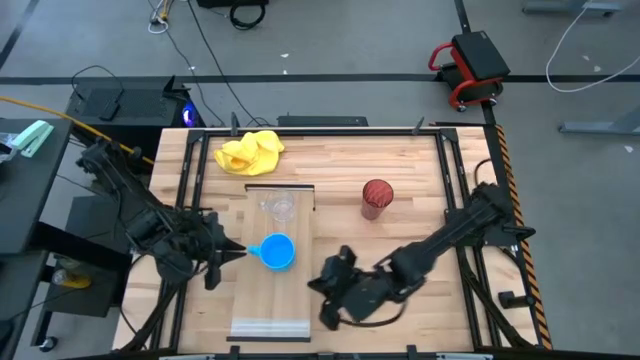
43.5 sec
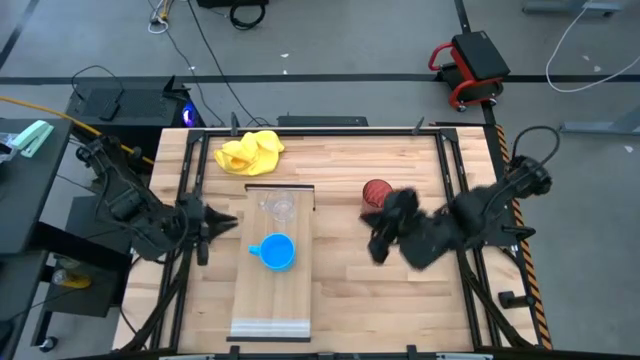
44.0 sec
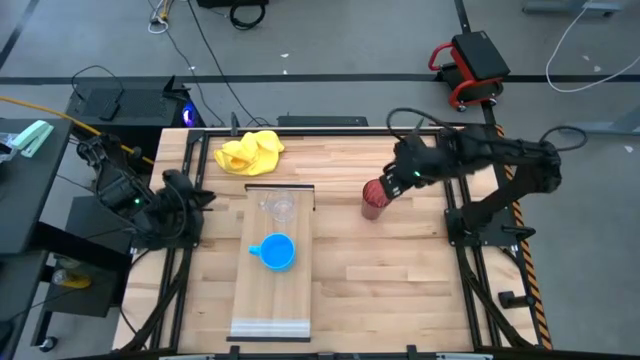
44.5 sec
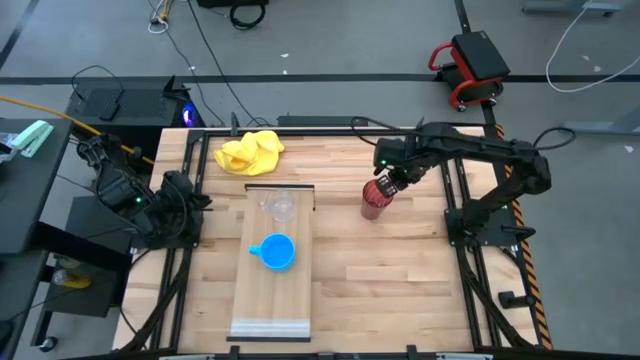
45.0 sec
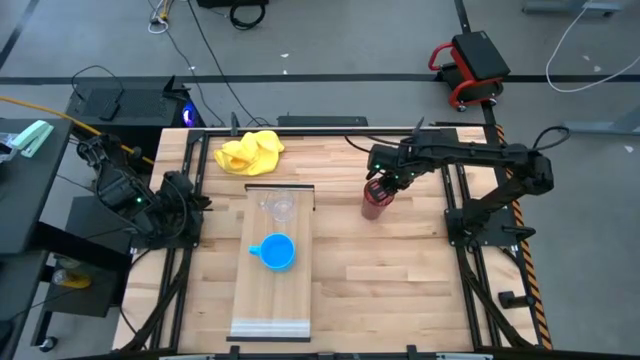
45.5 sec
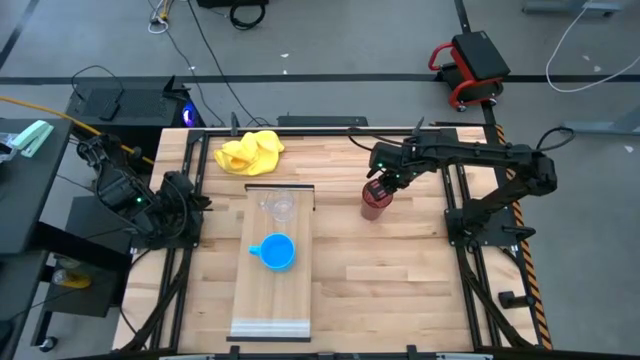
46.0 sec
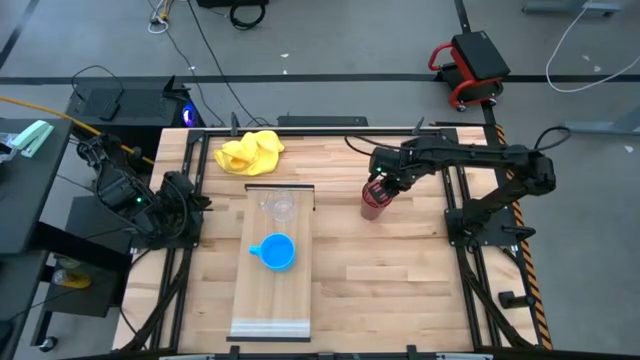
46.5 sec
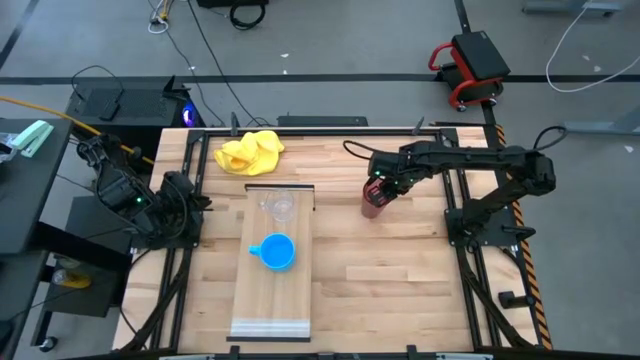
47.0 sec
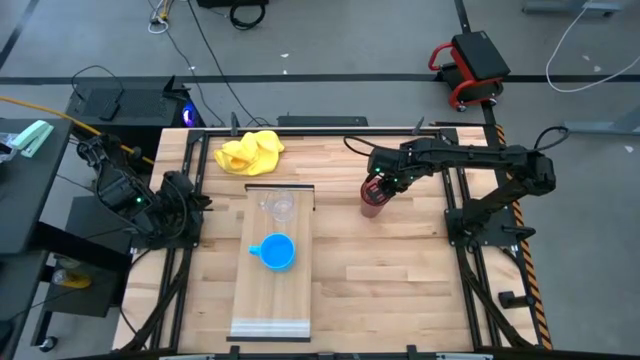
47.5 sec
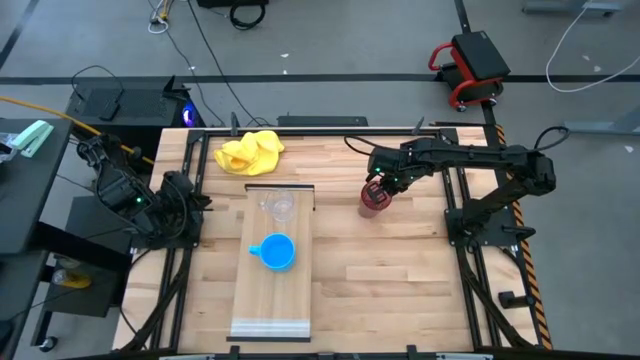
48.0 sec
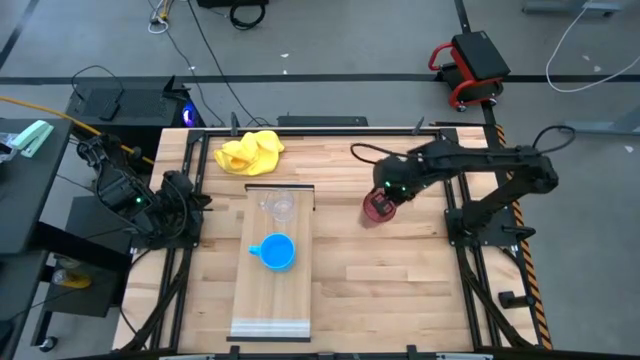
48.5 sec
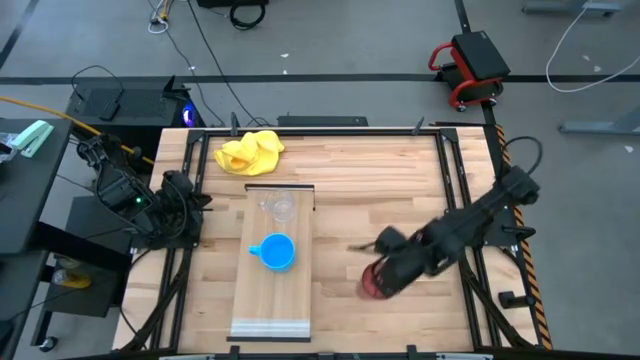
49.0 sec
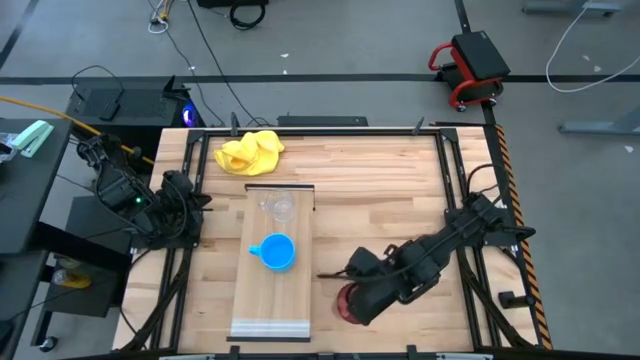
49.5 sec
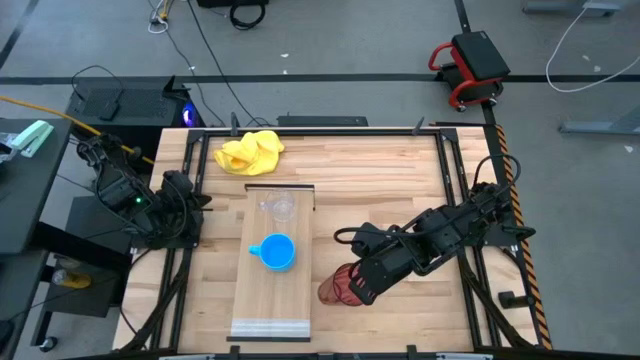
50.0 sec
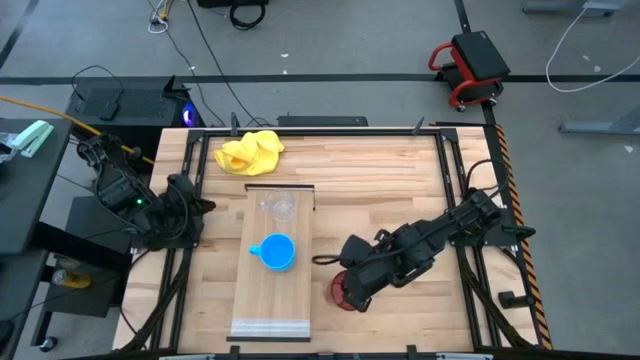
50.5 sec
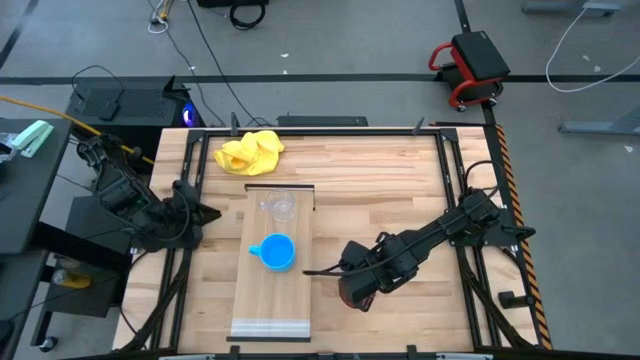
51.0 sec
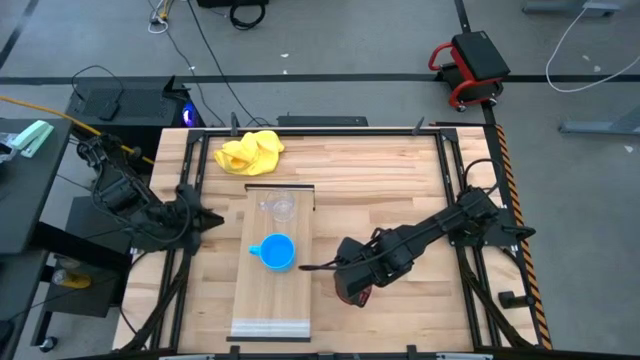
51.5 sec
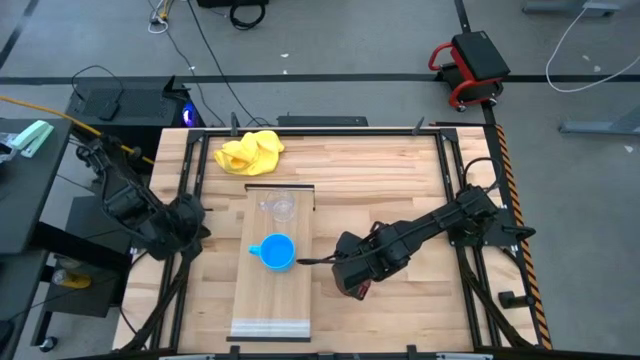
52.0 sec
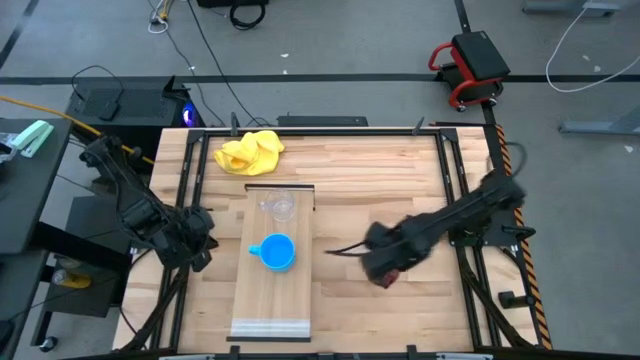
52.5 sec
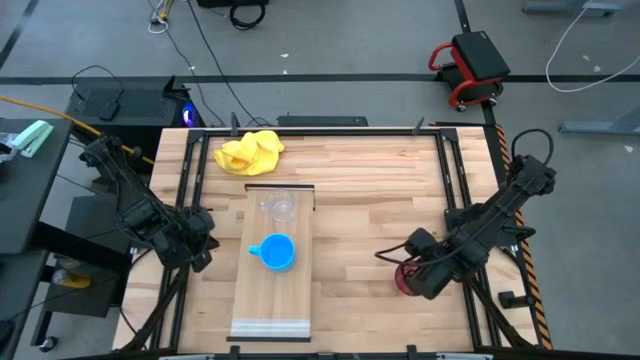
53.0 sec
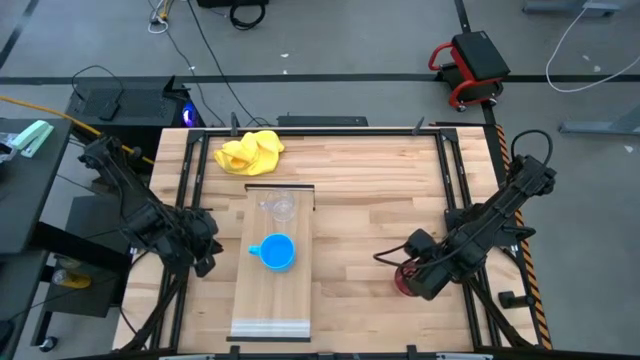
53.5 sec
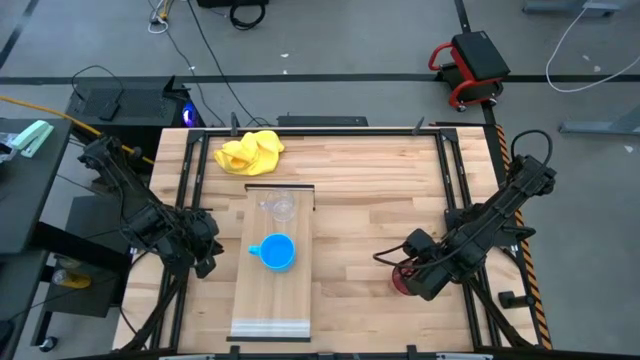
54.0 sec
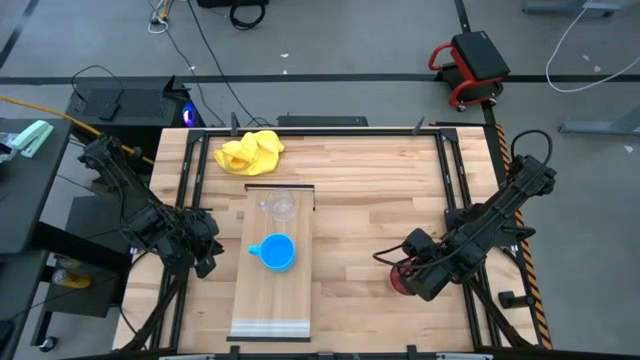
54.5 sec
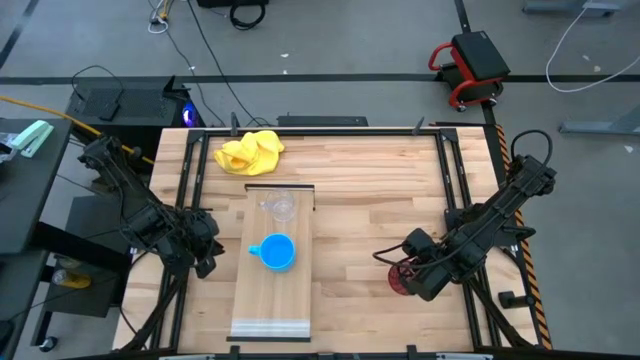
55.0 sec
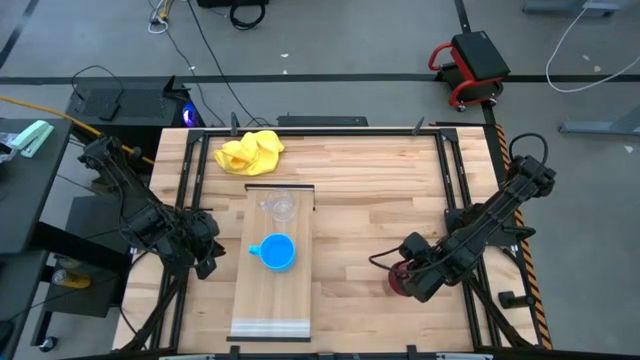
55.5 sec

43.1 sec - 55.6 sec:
Task: Stack small to large cups/mugs on shelf
Move the red cup to the bottom right on the shelf

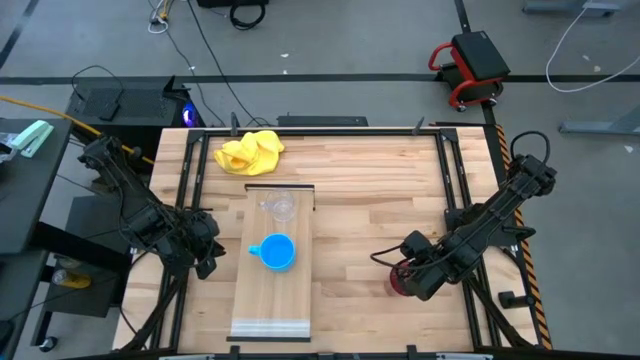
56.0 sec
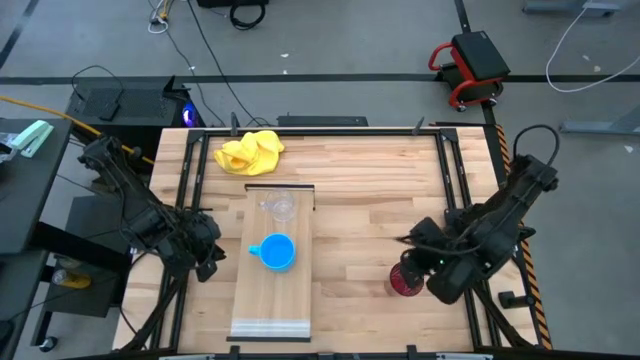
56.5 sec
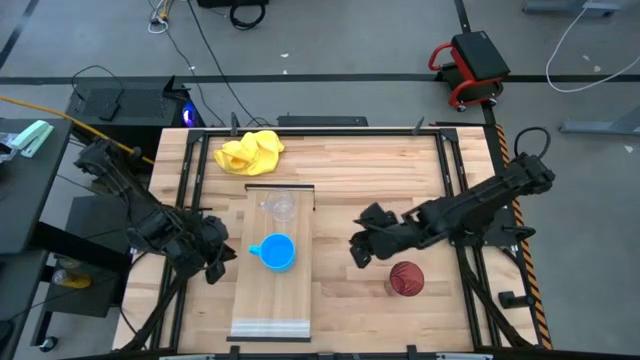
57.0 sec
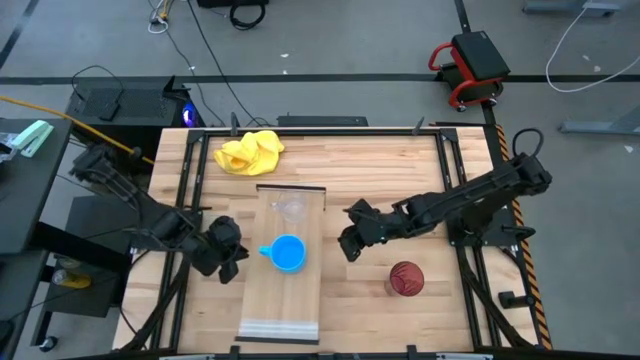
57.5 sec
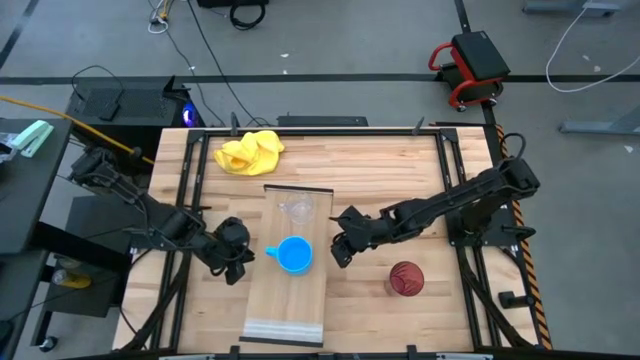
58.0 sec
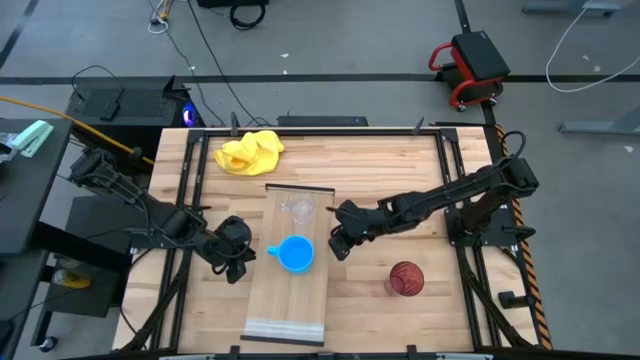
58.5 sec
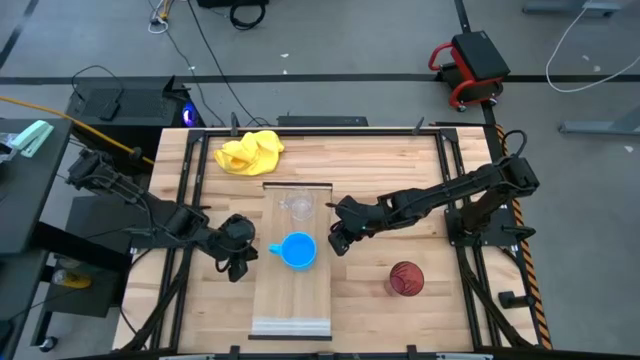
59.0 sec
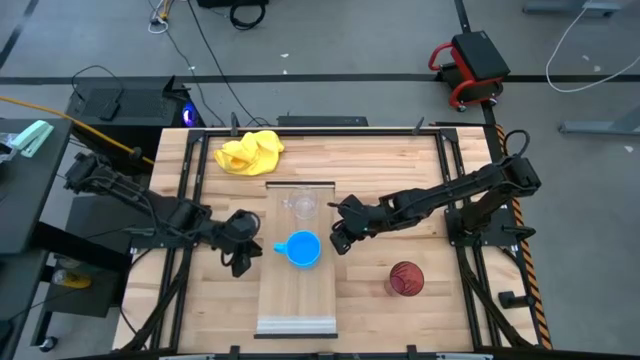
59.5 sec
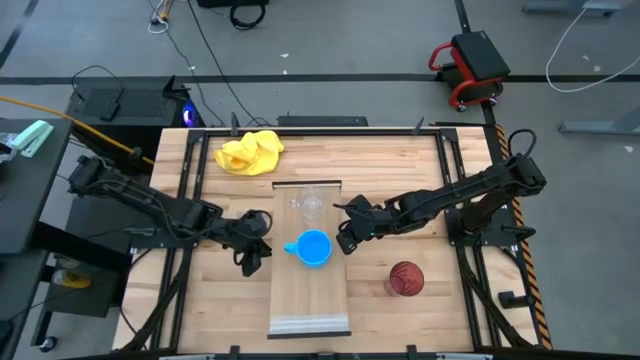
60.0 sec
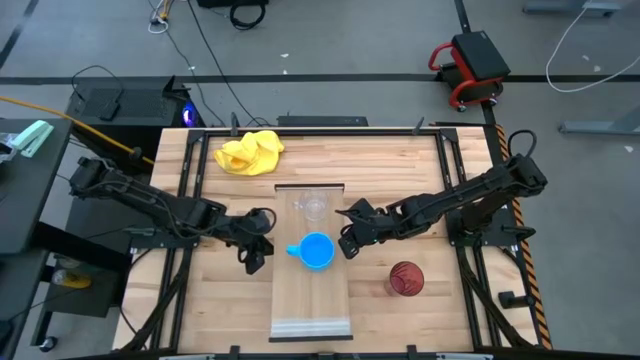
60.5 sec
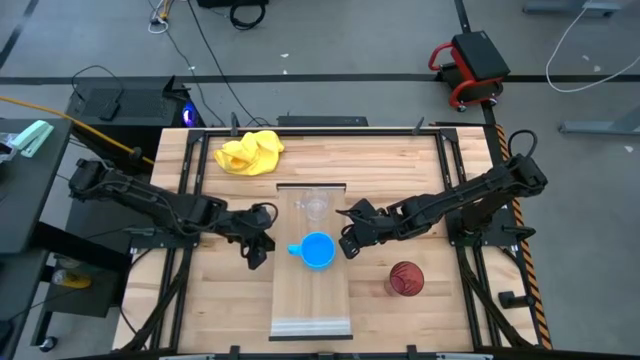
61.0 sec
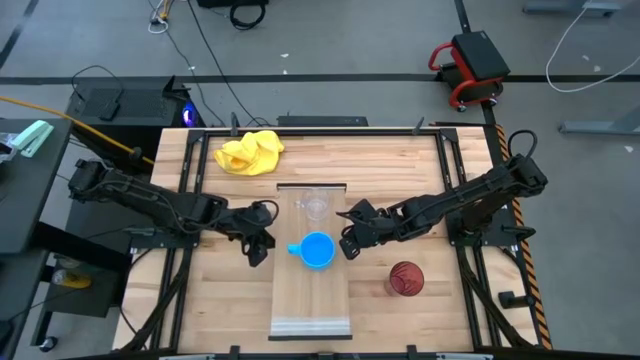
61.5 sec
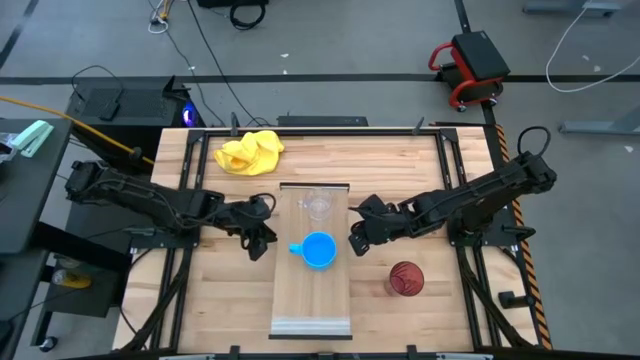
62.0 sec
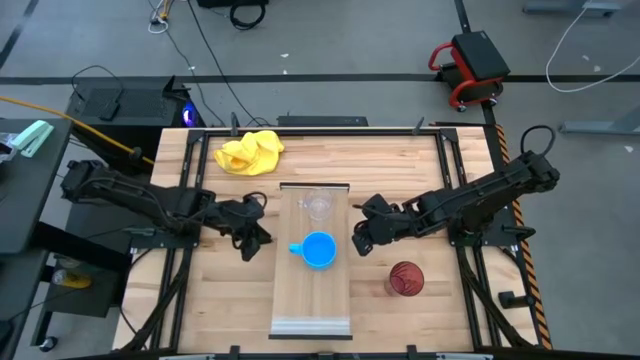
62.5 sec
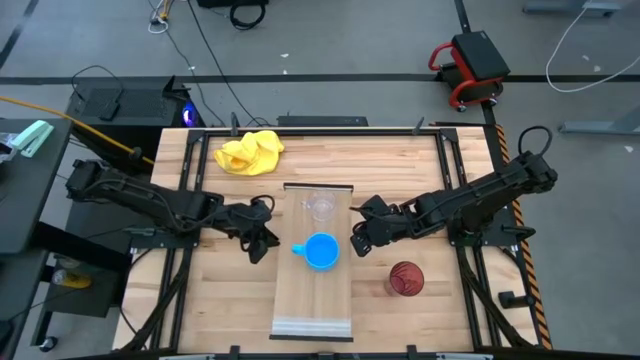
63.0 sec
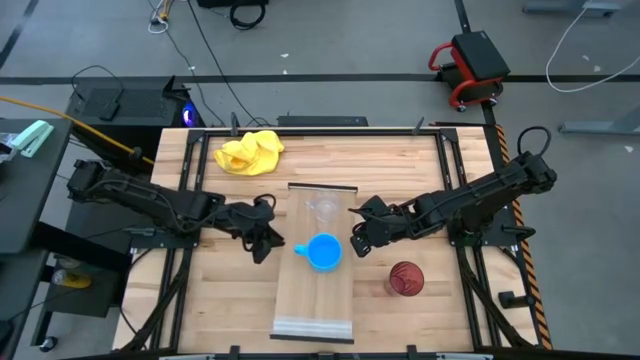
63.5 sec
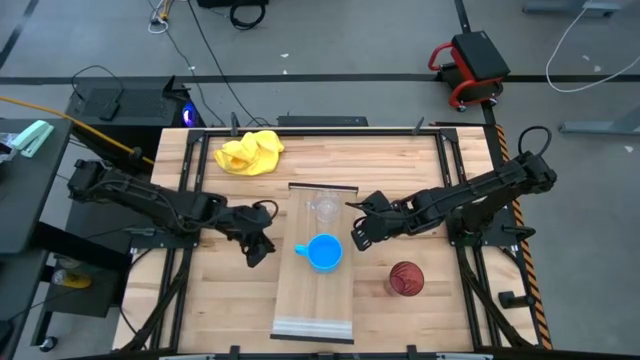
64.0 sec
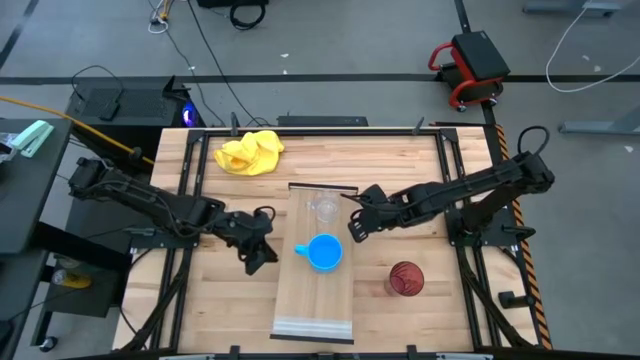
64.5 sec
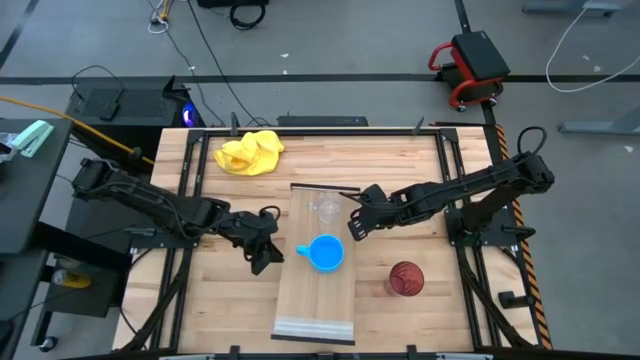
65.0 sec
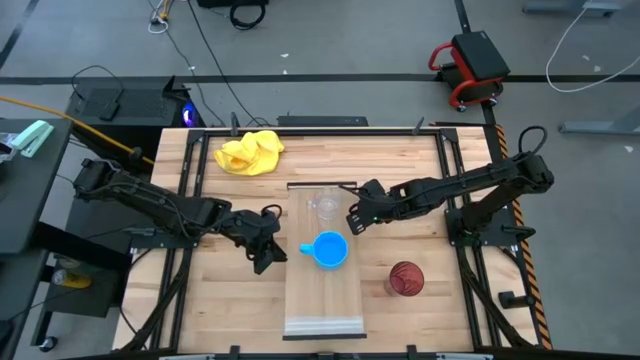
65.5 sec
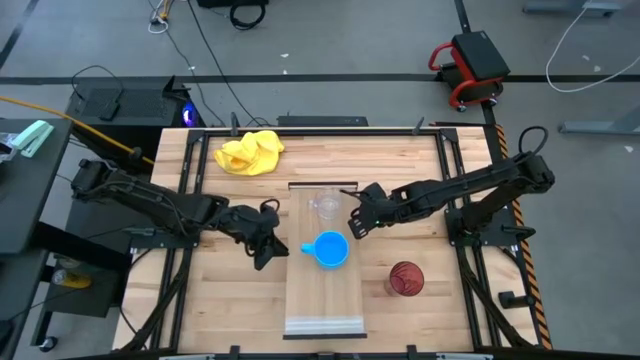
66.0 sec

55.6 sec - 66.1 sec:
Move the shelf to the center of the table
